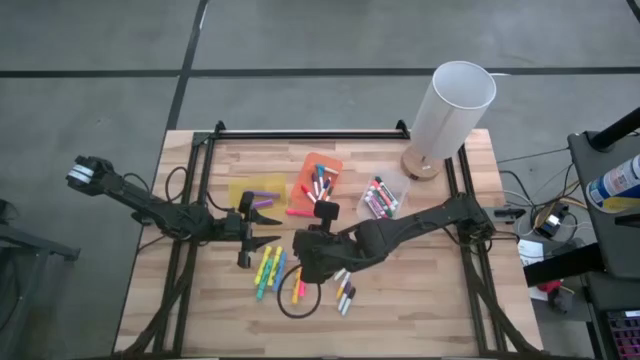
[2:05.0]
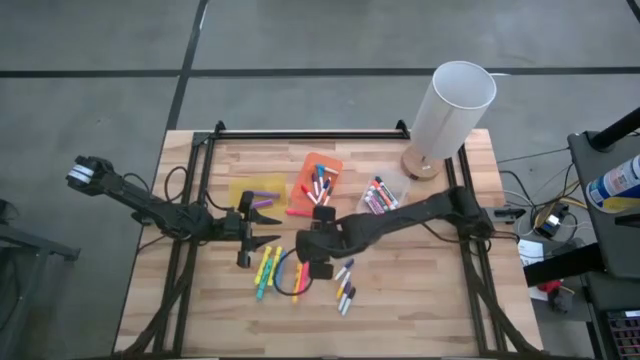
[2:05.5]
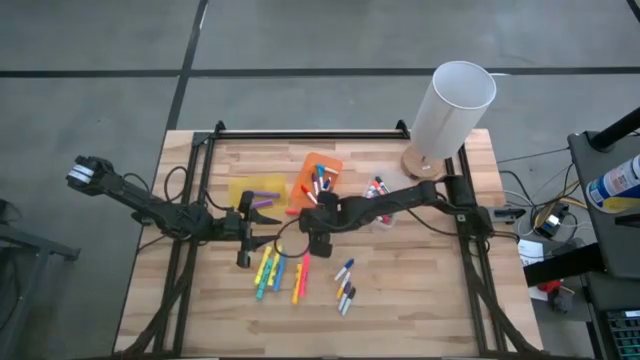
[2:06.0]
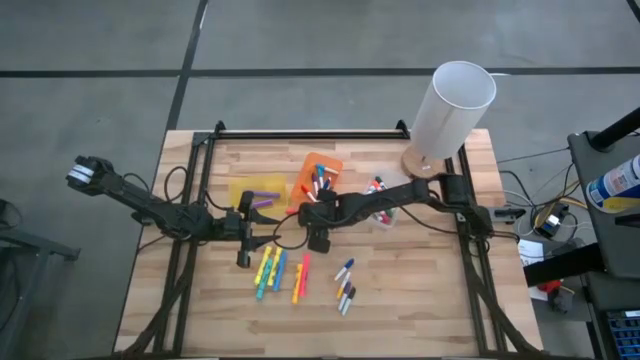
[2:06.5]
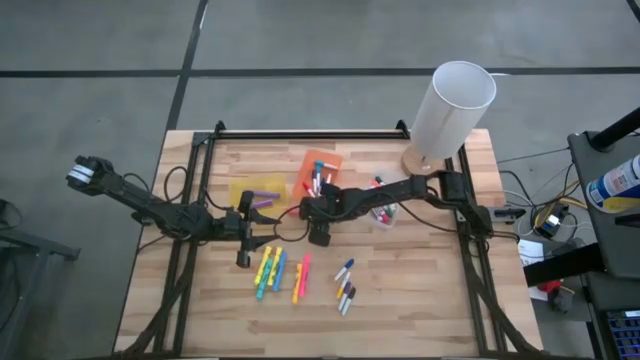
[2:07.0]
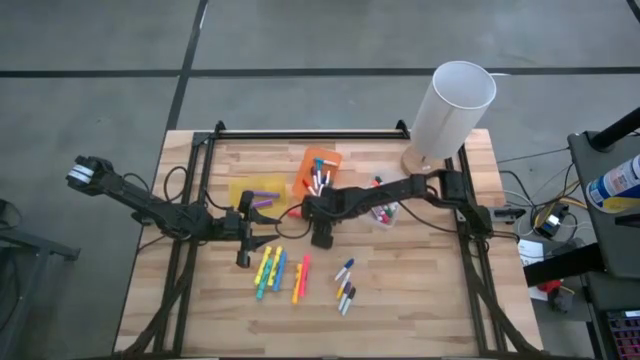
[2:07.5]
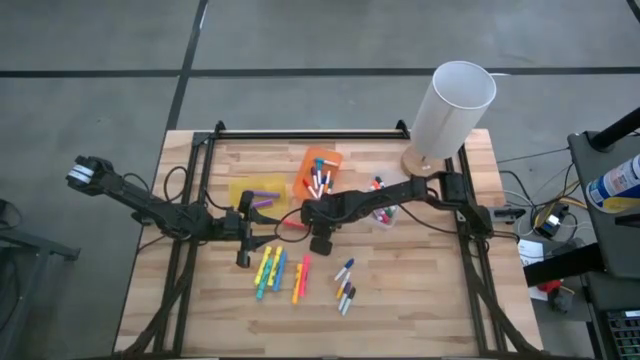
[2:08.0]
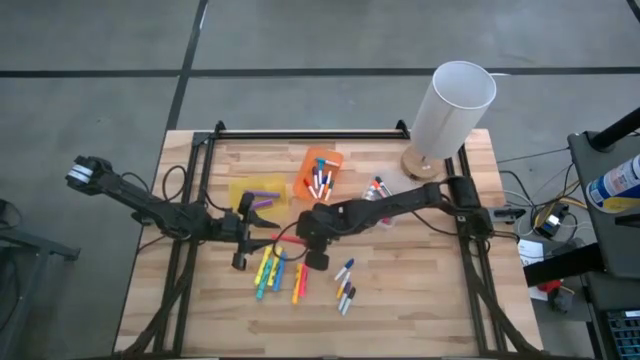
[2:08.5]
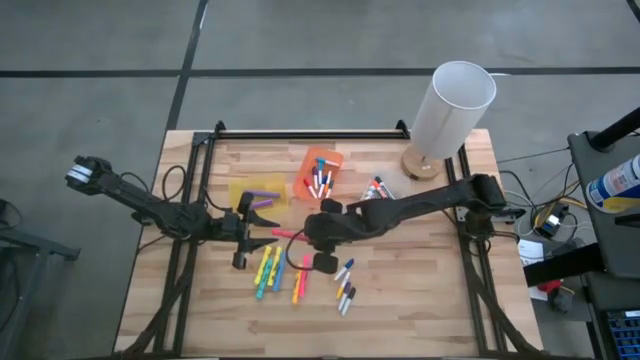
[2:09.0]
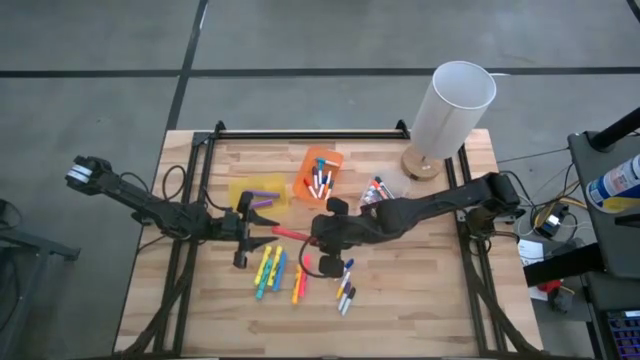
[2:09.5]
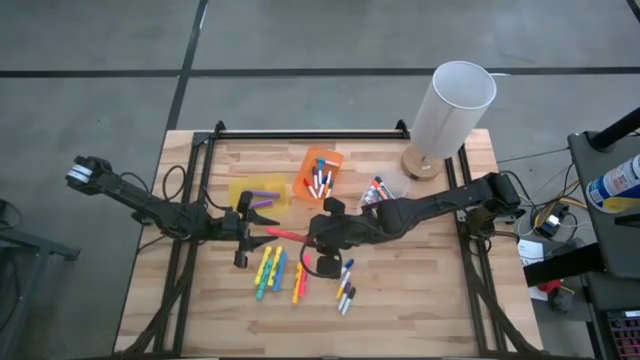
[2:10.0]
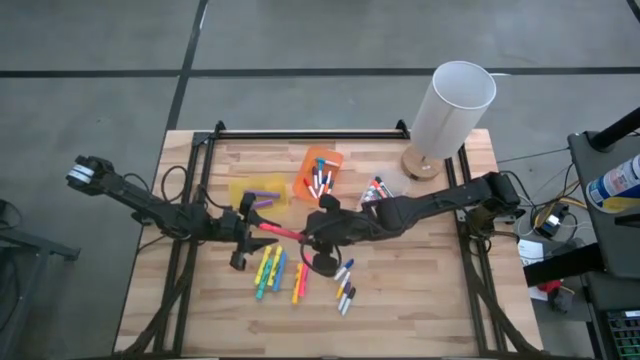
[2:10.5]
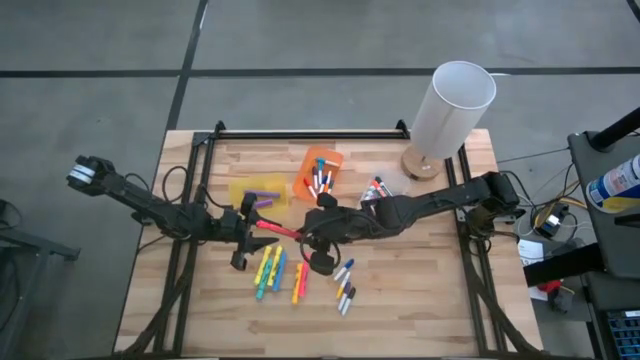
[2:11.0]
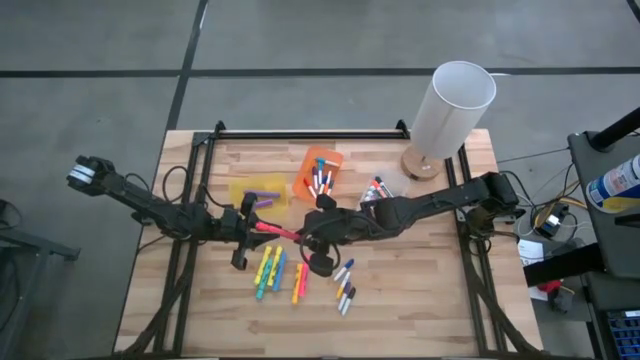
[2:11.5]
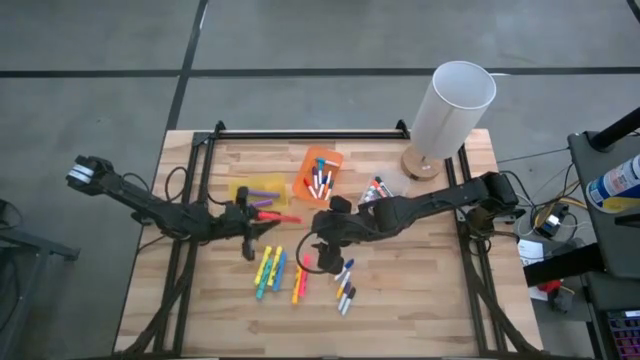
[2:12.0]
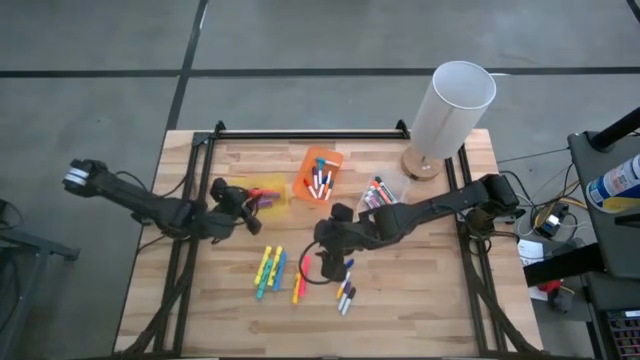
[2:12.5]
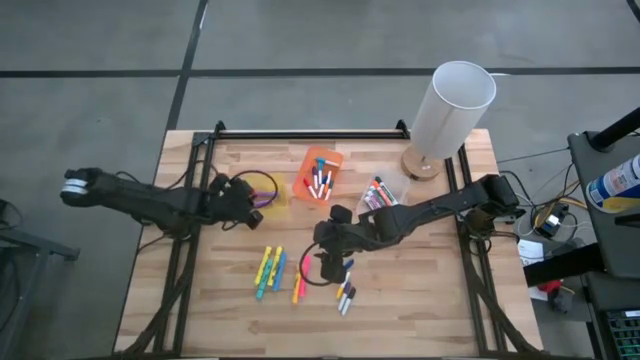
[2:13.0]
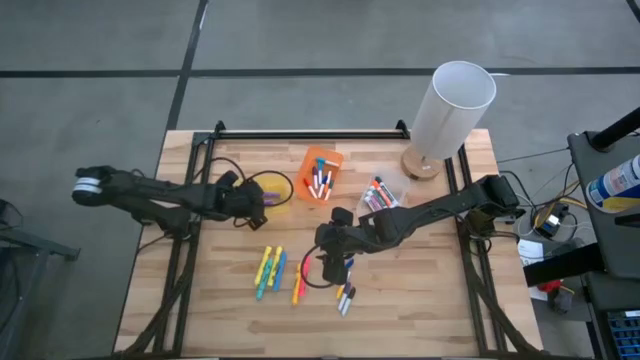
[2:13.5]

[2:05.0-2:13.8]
Task: Pick & Place Markers
Put the orange highlighter pen into the yellow bin

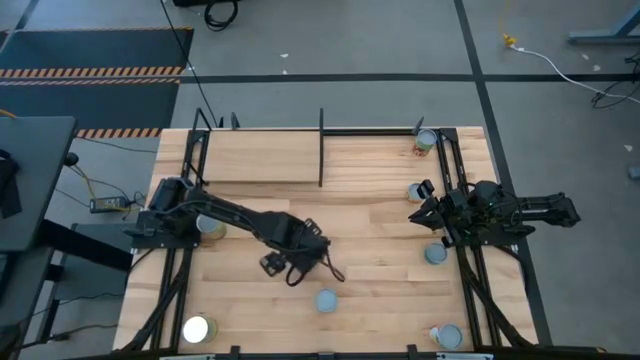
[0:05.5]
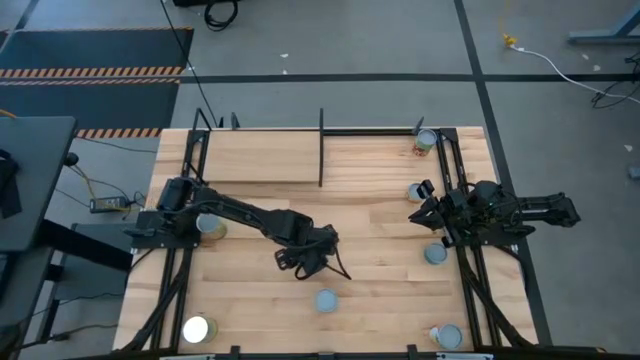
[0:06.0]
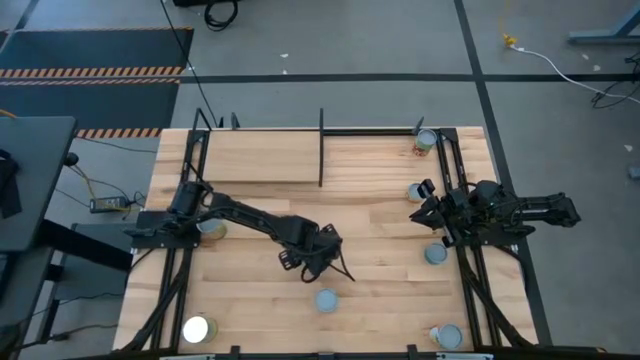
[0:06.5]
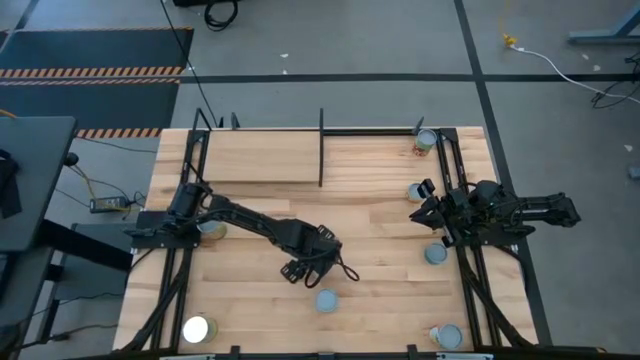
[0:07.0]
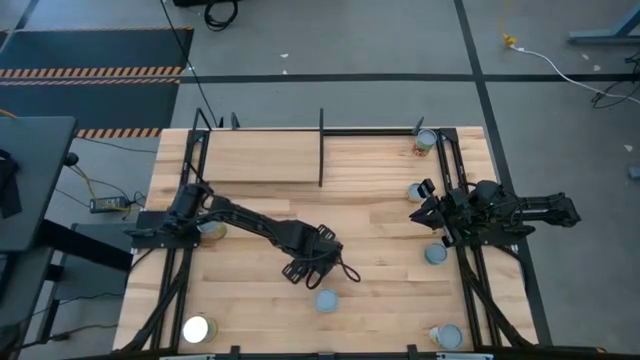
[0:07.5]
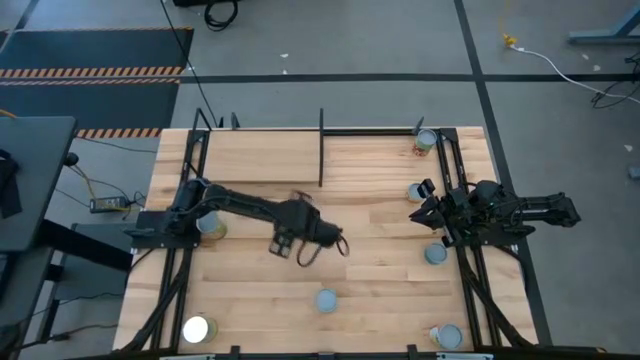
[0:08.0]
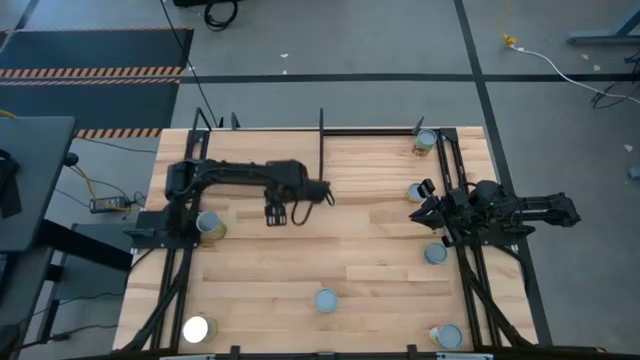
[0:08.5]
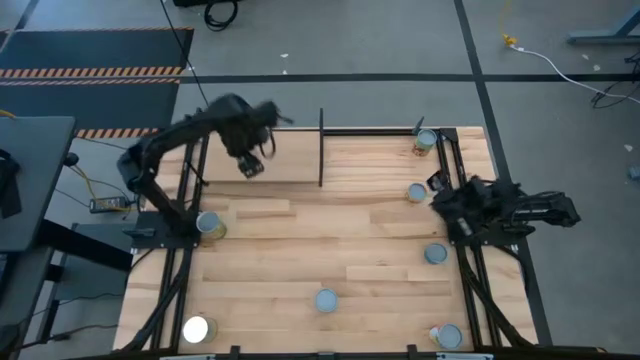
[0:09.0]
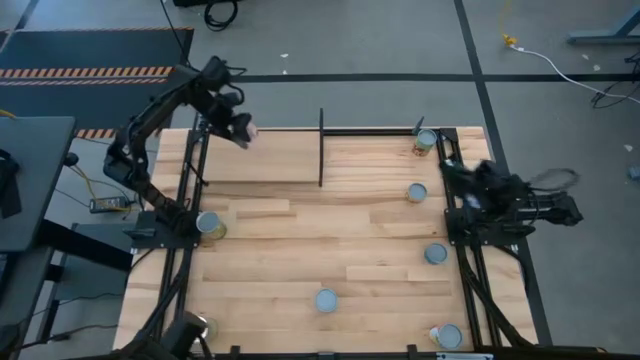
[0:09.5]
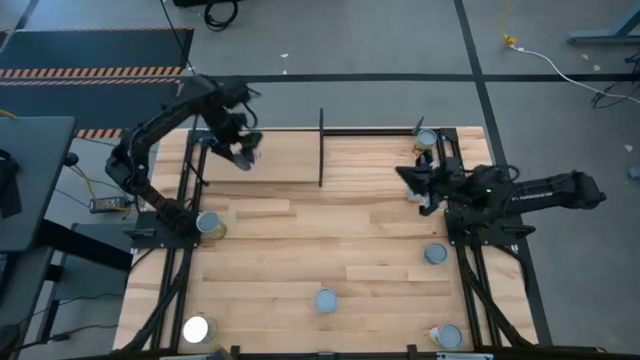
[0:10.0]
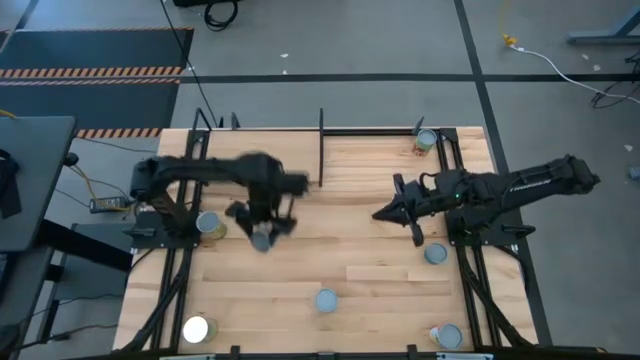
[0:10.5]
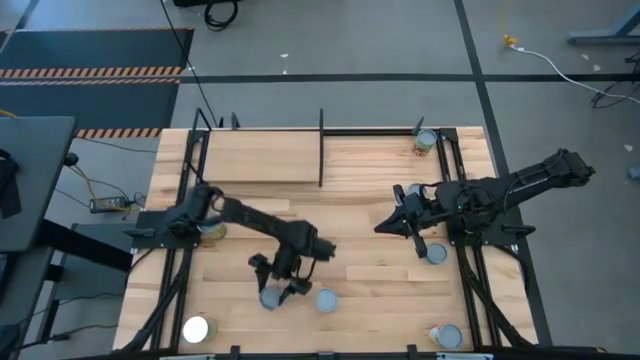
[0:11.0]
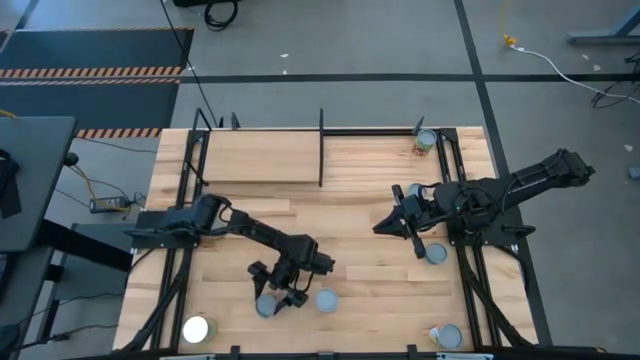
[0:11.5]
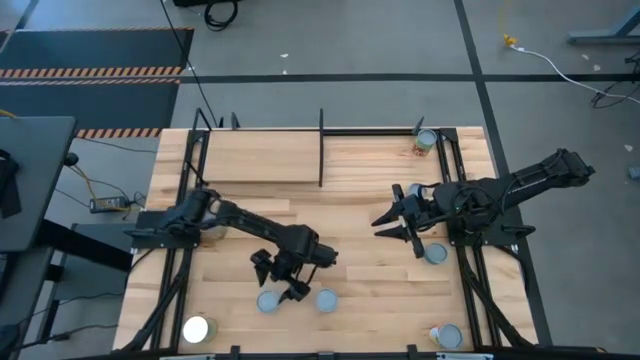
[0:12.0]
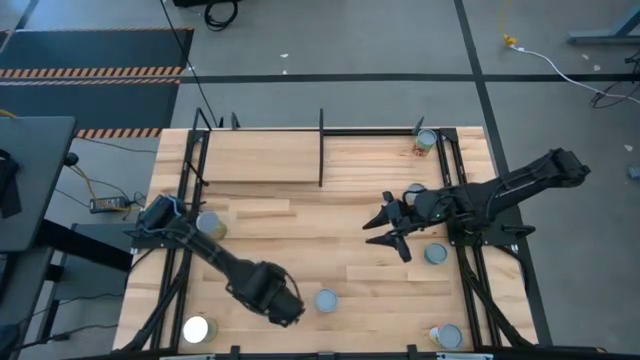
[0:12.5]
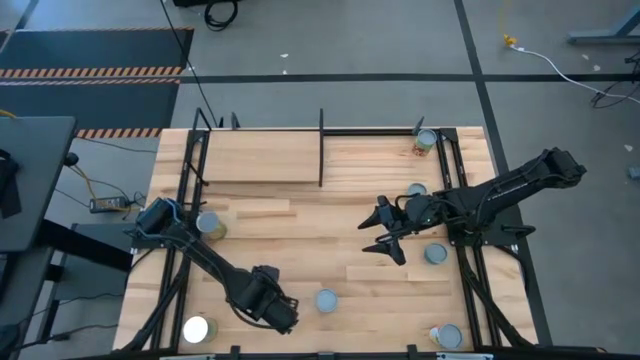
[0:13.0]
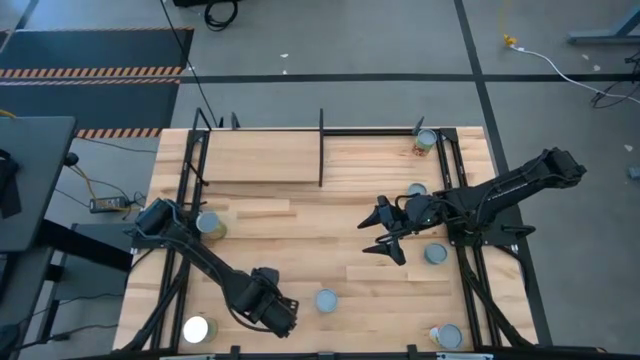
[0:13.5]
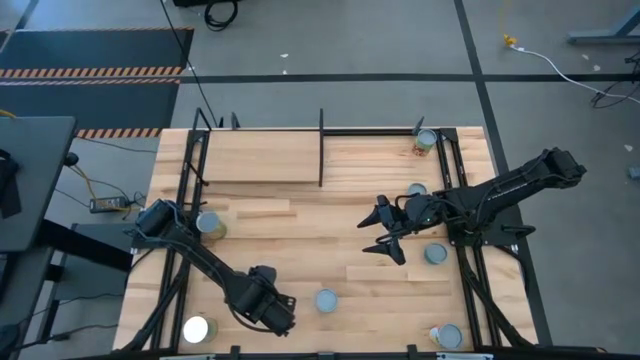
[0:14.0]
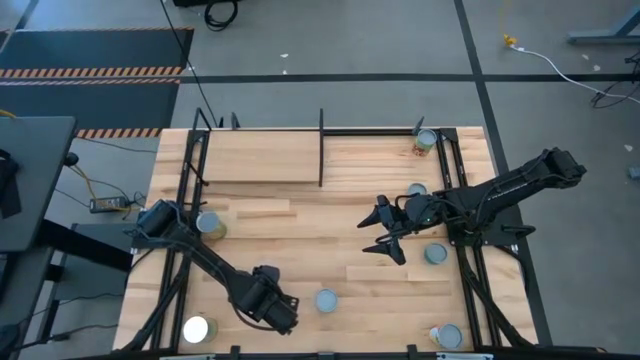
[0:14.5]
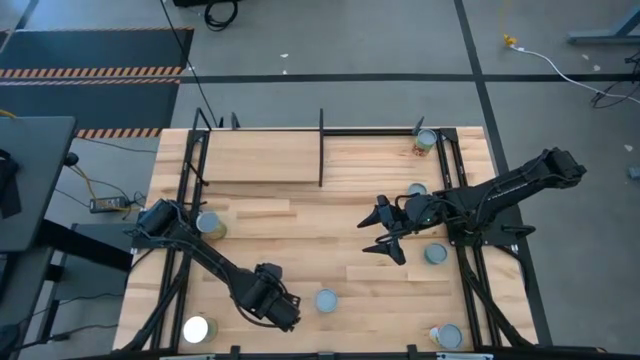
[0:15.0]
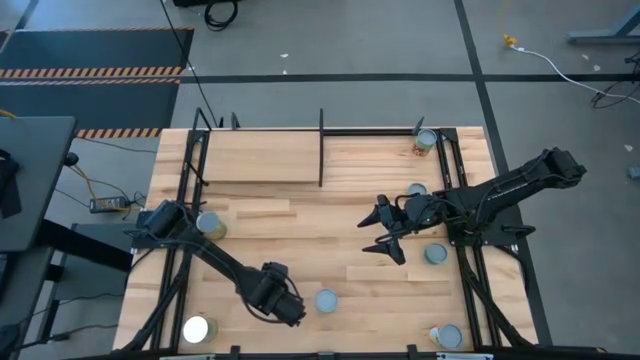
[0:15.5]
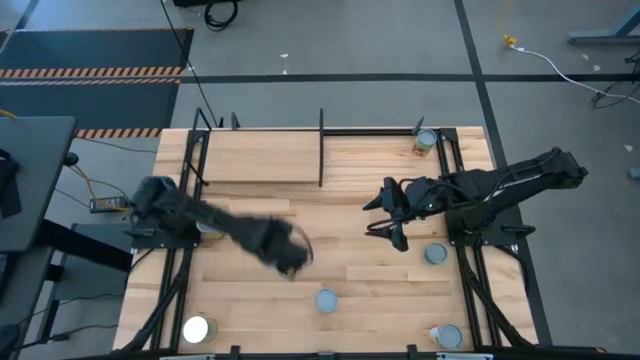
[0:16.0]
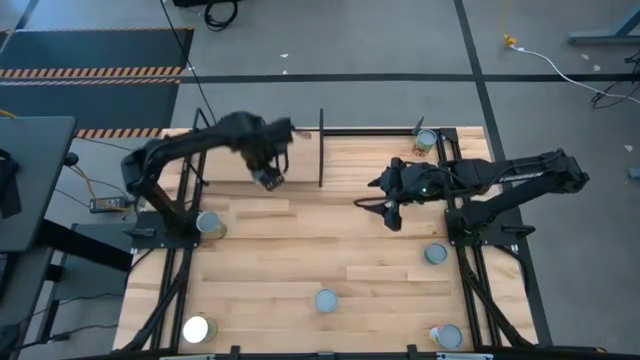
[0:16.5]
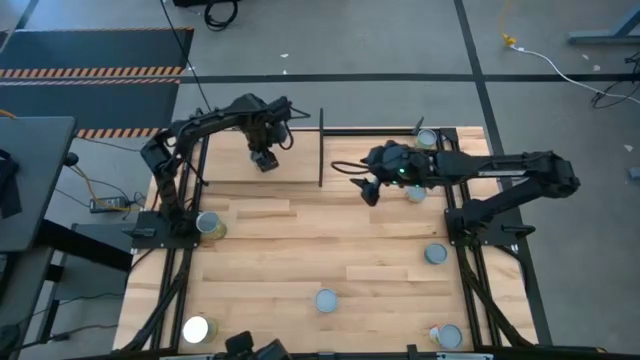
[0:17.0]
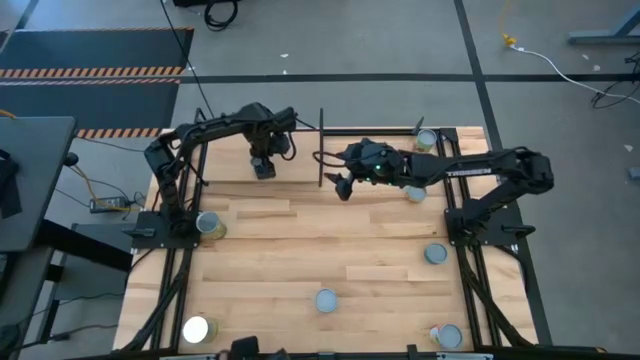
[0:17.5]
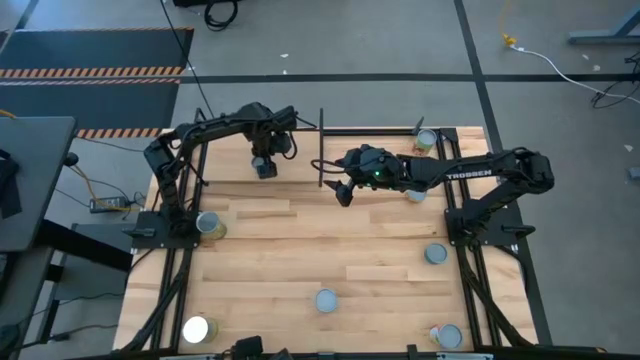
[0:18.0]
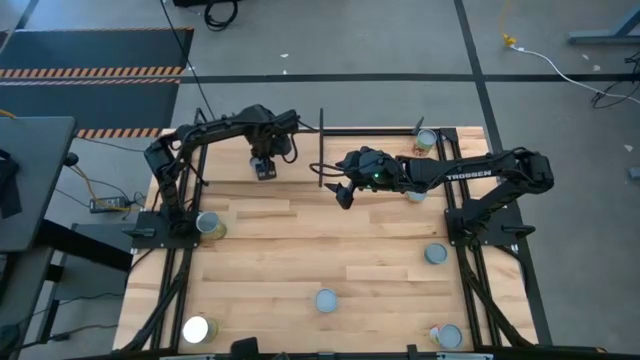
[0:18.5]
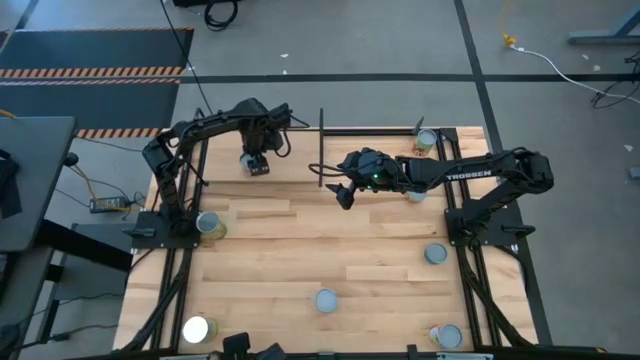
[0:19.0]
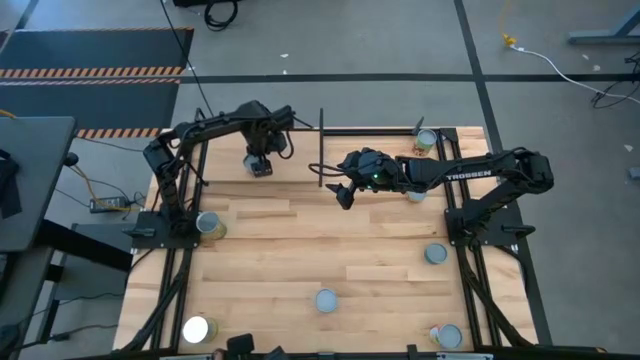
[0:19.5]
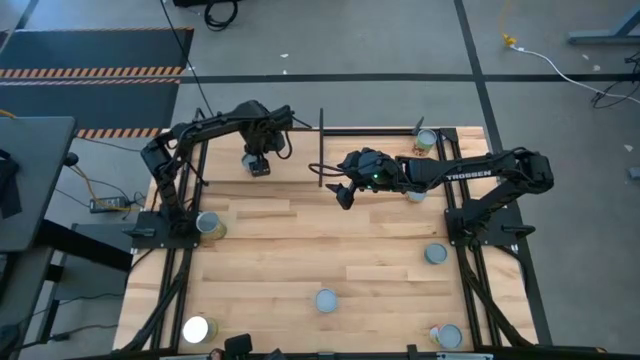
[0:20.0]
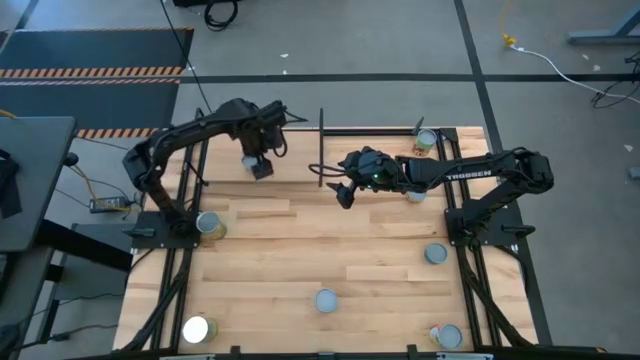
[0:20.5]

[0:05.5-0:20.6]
Task: Pick and place cans onto a shelf
Put the canned diced tomatoes on the shelf
